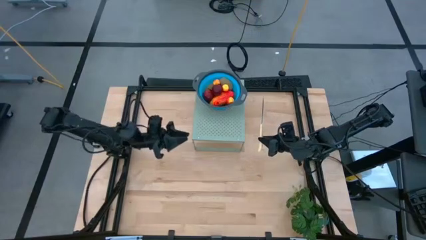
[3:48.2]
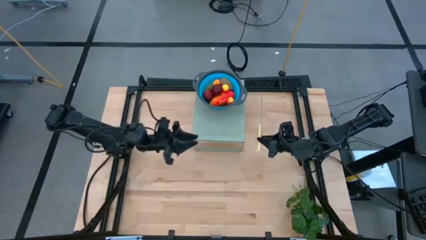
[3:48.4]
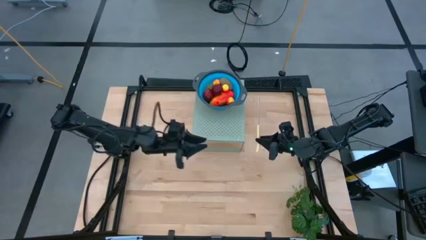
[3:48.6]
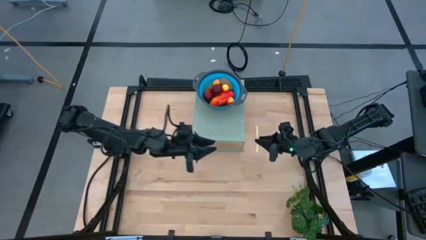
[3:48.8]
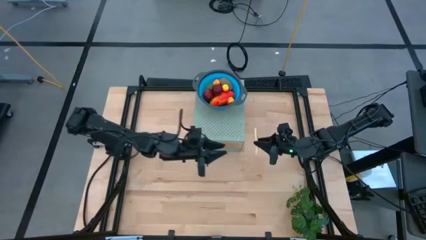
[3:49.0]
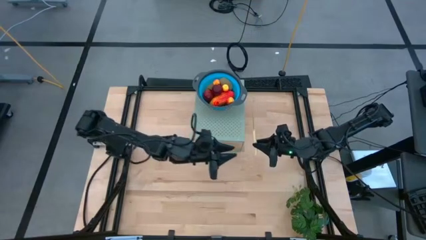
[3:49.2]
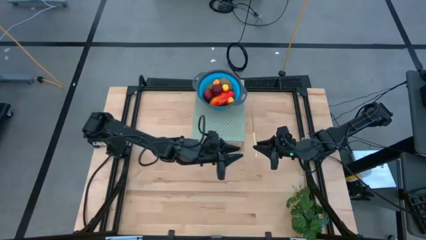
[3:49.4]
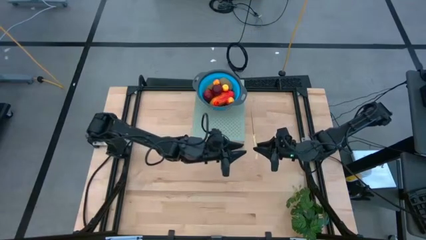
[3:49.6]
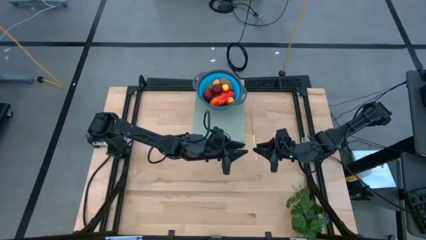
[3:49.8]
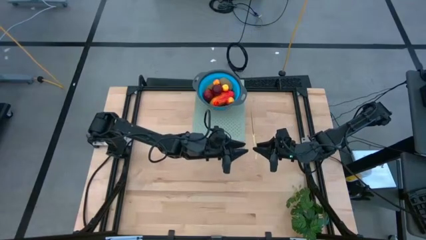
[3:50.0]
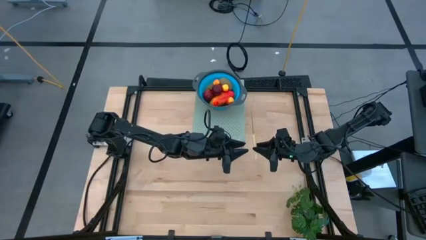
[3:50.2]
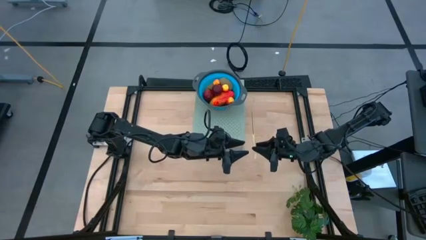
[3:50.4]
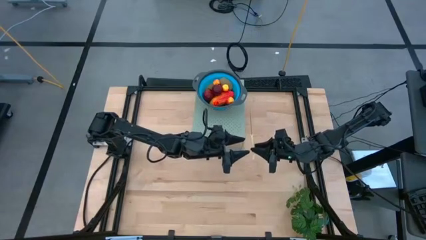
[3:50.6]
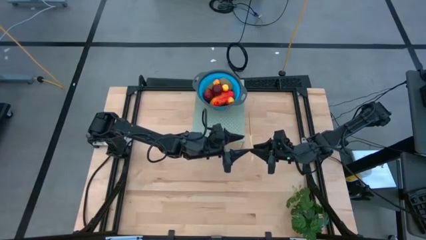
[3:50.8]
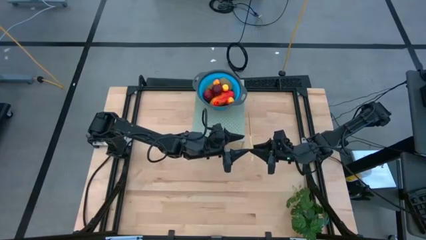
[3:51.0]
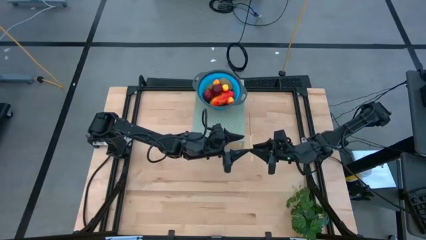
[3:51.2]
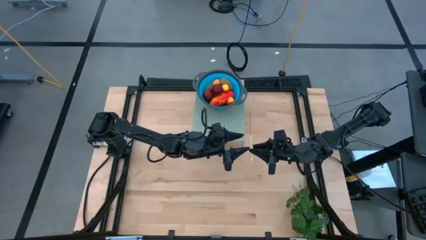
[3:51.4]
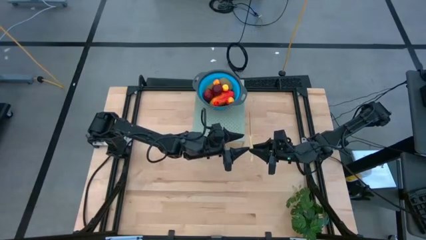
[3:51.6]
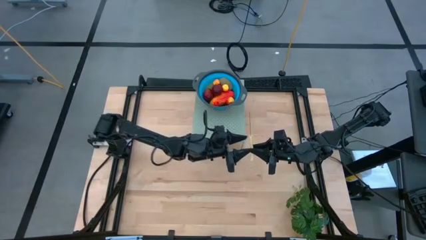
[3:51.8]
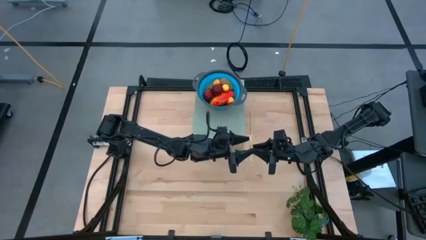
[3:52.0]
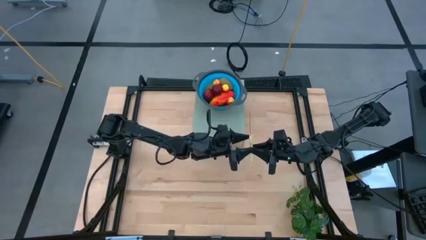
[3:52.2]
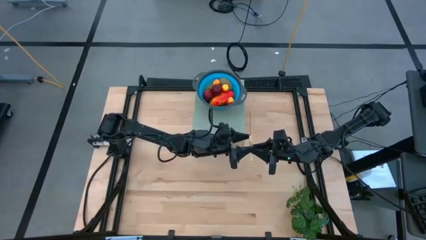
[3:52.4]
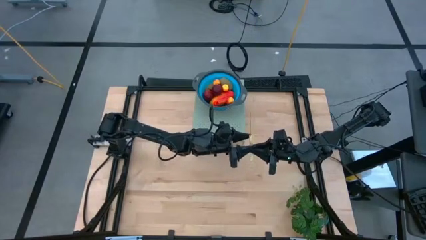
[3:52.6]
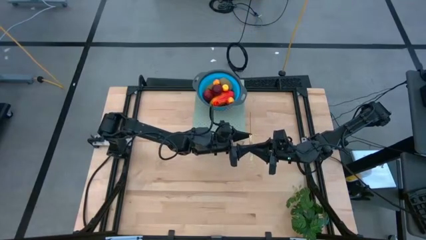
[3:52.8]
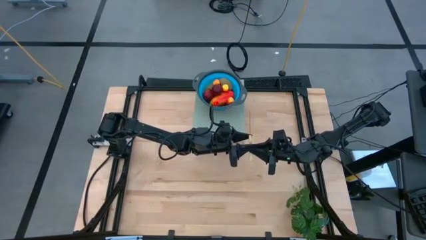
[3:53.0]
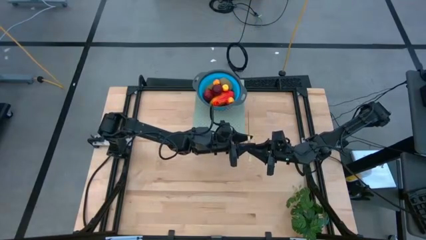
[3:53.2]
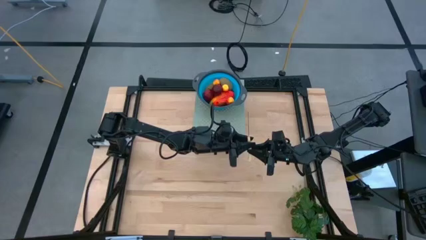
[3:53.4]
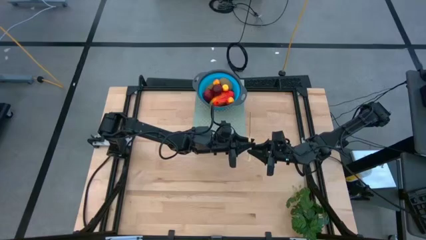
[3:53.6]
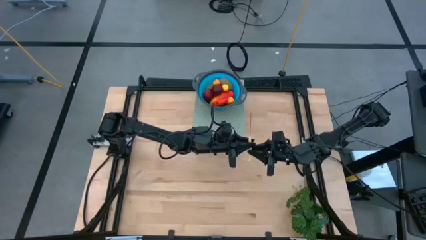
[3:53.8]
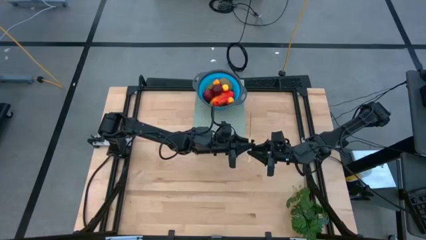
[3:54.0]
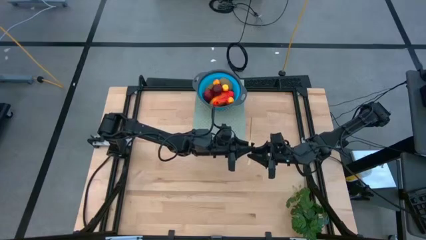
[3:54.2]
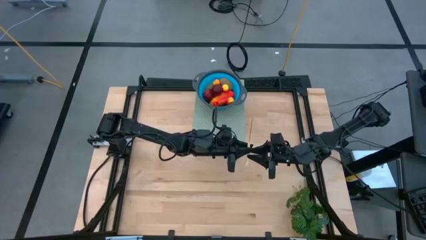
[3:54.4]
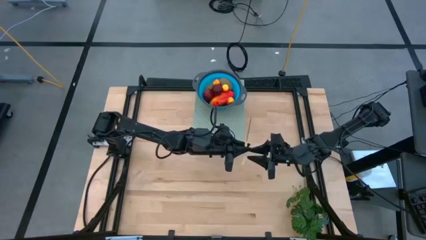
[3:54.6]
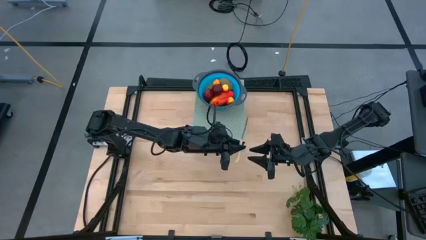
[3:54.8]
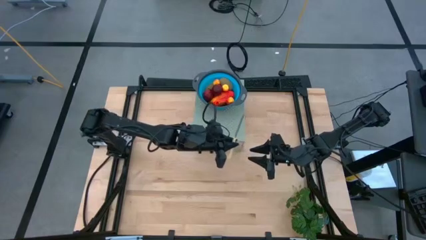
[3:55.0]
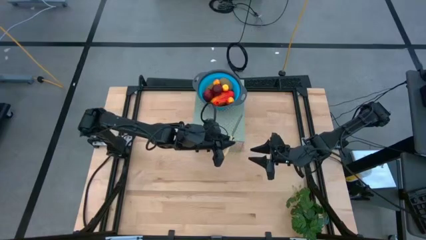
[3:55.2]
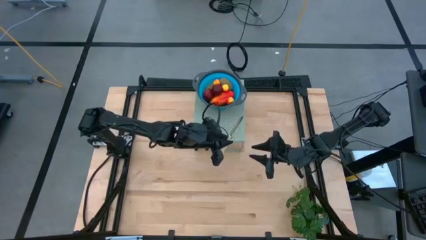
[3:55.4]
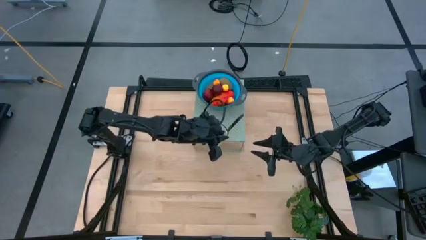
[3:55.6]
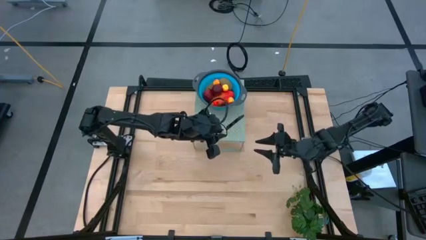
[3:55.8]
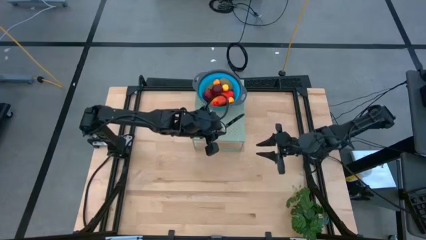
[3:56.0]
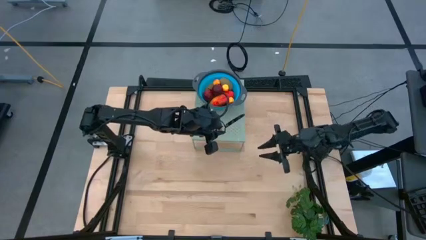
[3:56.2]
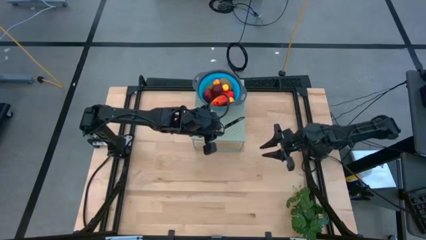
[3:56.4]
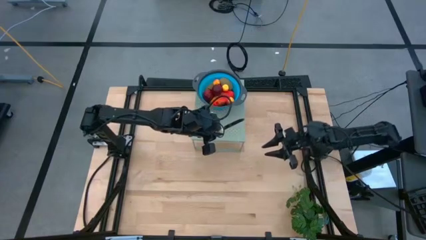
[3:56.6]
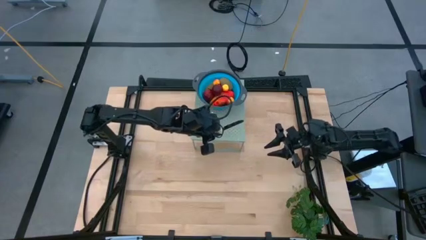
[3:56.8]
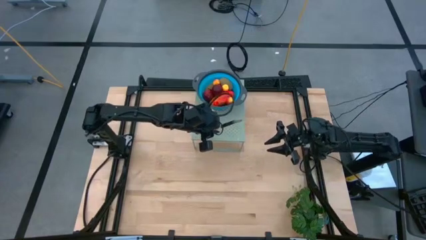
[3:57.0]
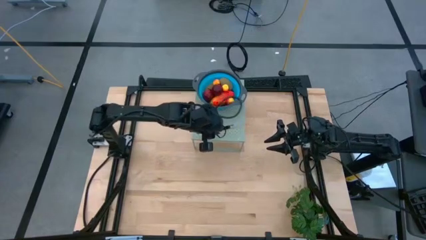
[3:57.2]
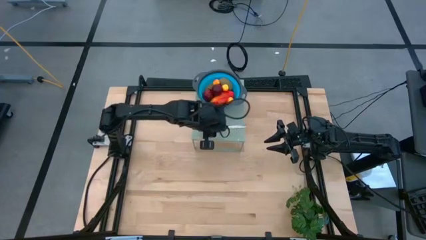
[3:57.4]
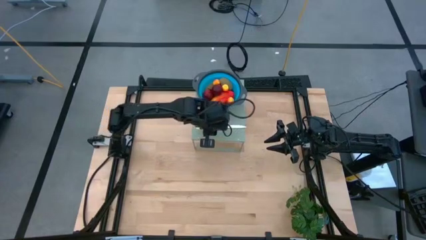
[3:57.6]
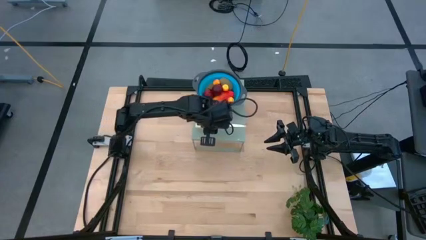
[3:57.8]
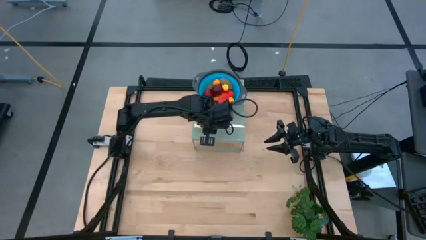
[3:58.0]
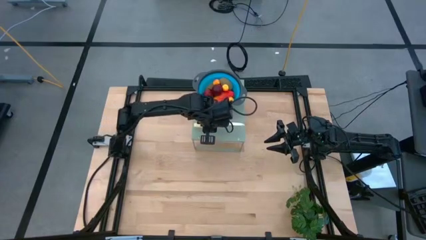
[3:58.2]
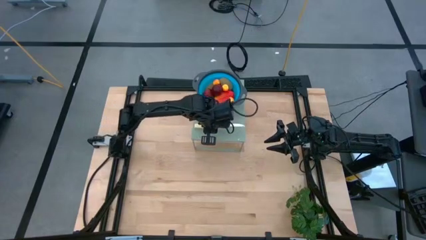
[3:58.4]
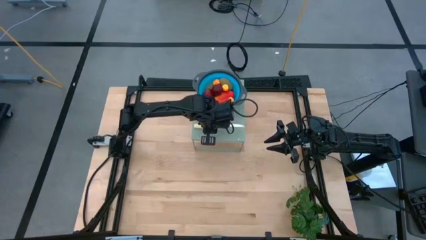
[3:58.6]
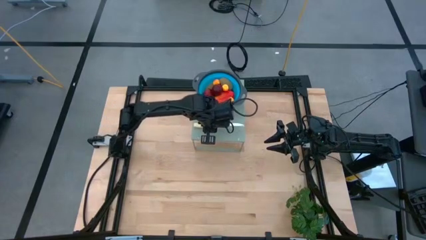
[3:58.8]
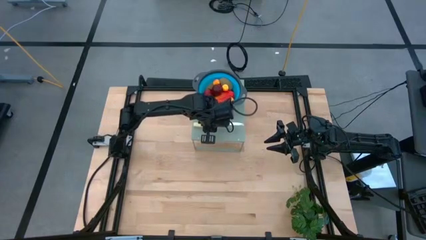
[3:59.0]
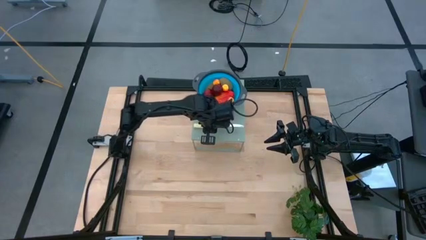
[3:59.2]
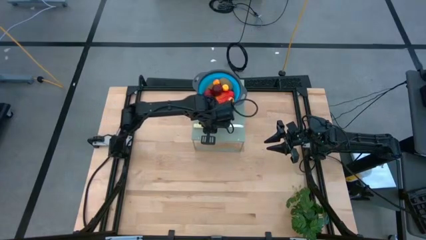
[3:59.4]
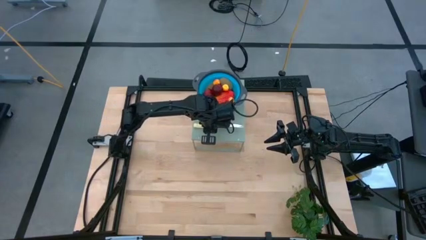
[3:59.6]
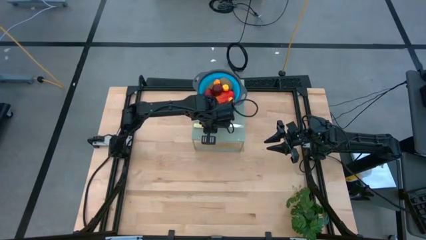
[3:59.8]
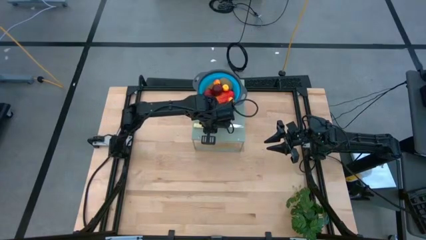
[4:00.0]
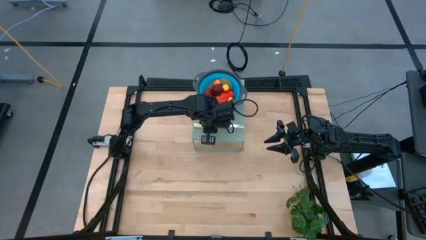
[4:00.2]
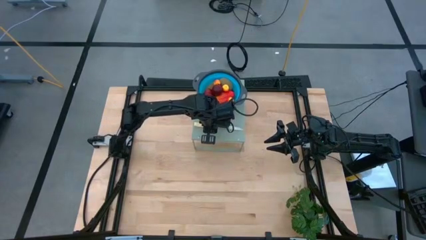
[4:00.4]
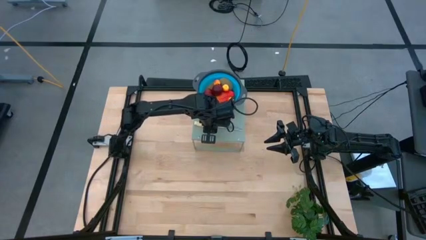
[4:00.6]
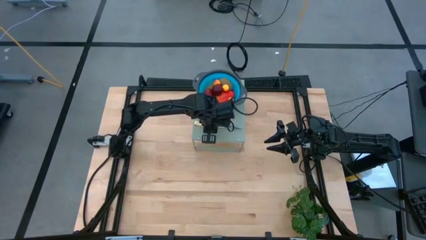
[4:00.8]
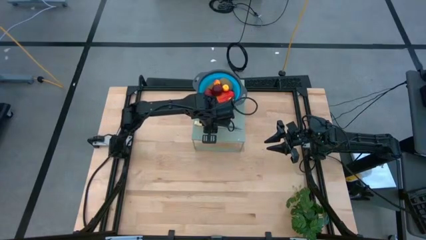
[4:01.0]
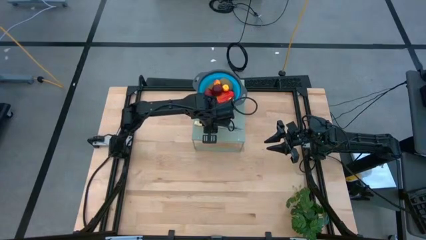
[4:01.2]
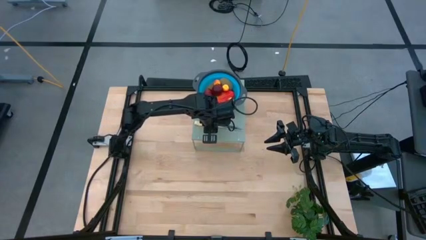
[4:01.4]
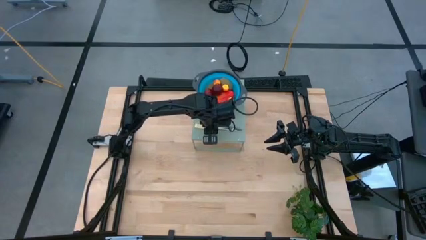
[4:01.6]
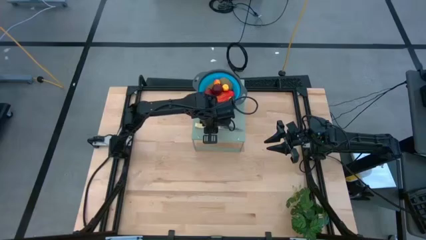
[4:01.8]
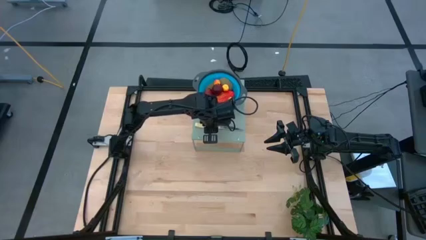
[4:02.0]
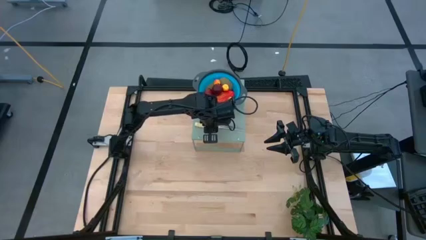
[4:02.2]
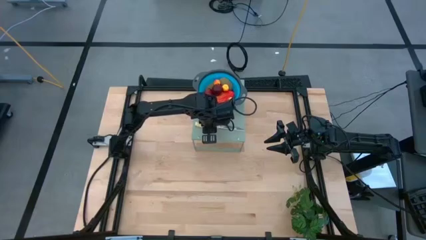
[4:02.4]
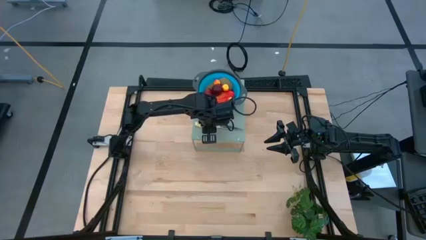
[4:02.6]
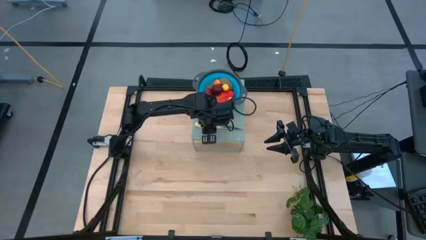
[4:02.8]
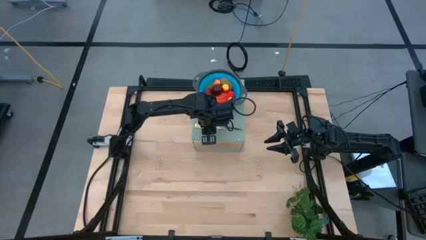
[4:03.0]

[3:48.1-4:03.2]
Task: Pick & Place Fruit
Put the yellow knife on the shelf
